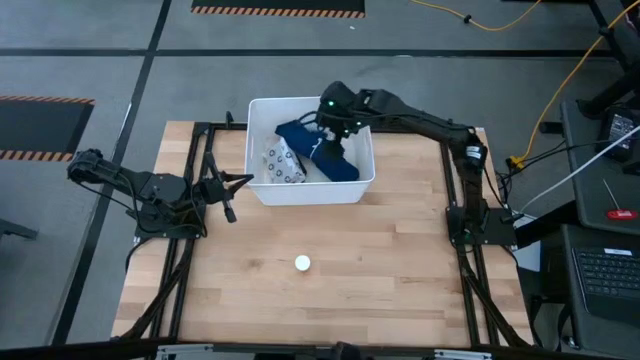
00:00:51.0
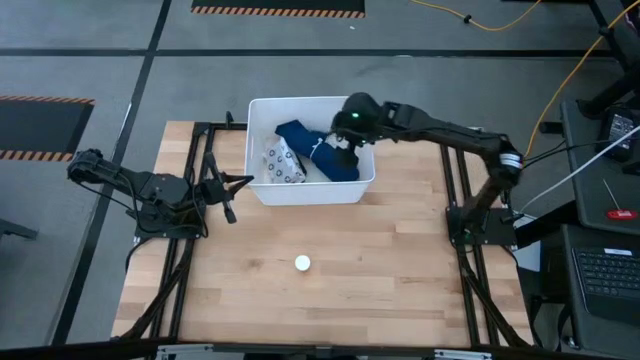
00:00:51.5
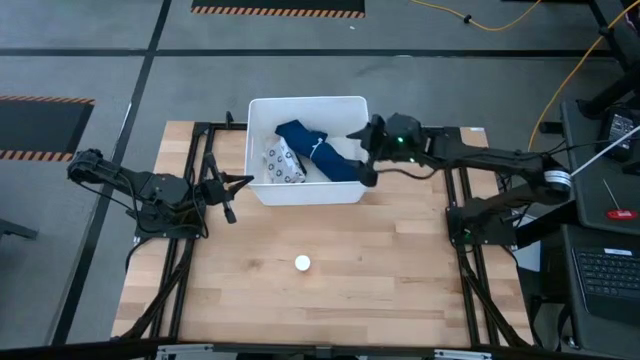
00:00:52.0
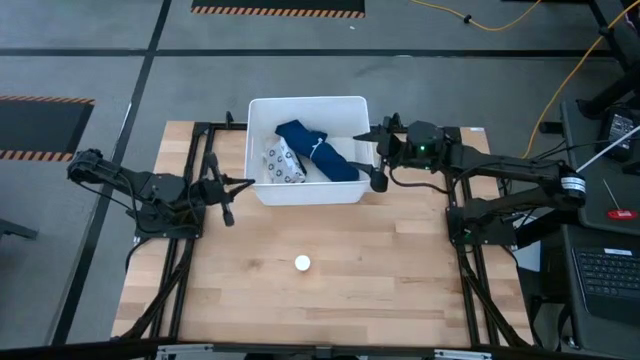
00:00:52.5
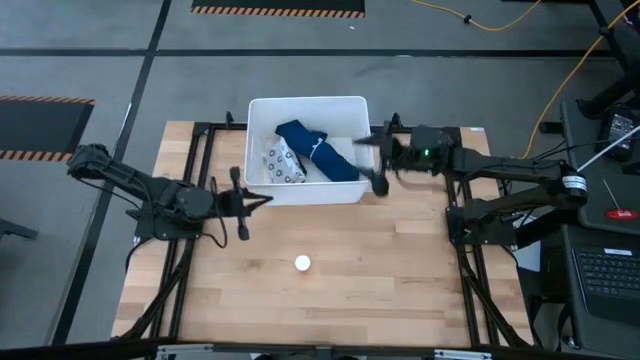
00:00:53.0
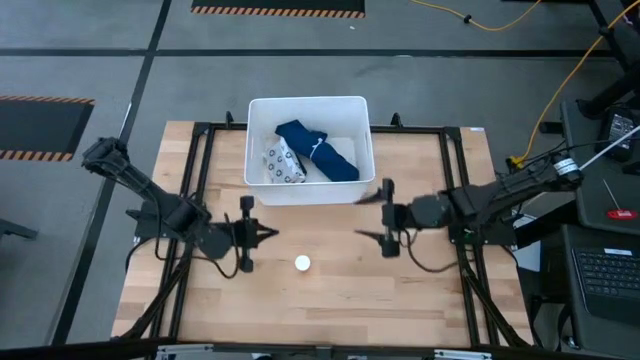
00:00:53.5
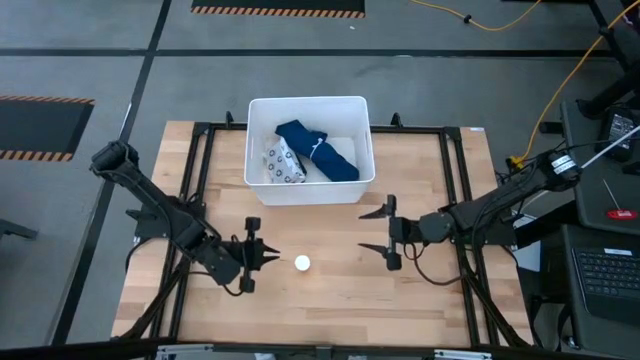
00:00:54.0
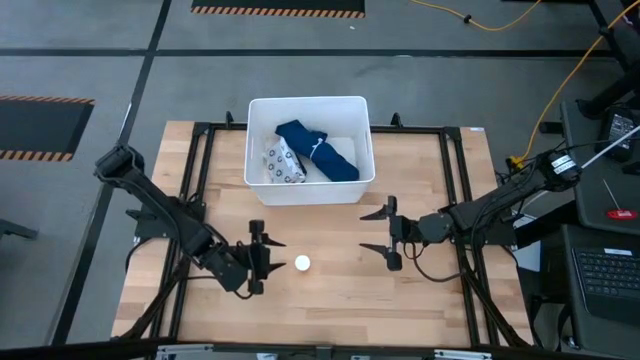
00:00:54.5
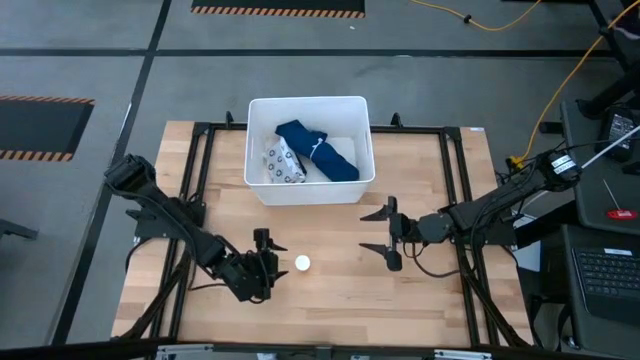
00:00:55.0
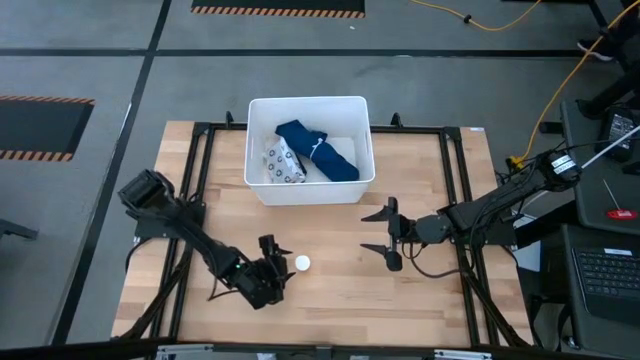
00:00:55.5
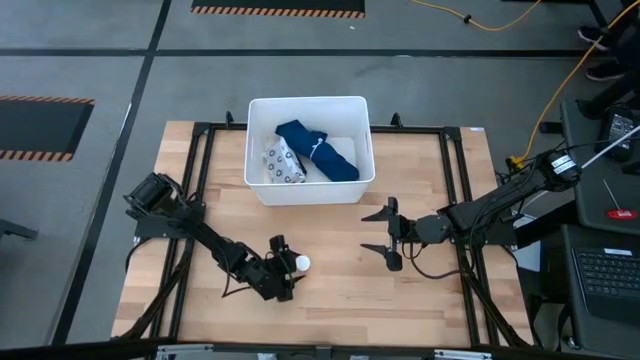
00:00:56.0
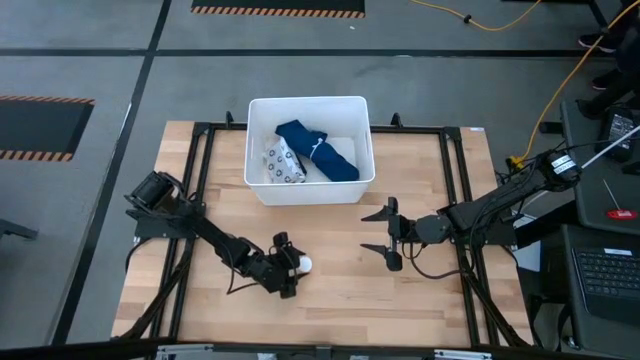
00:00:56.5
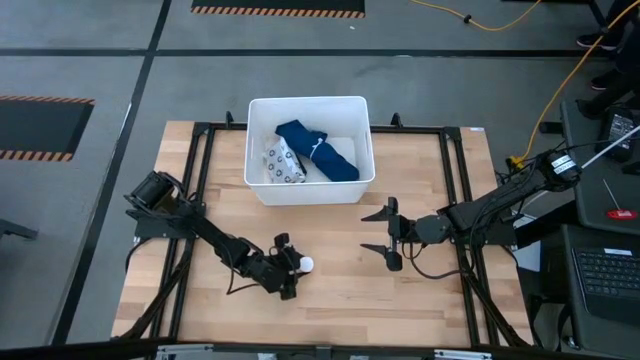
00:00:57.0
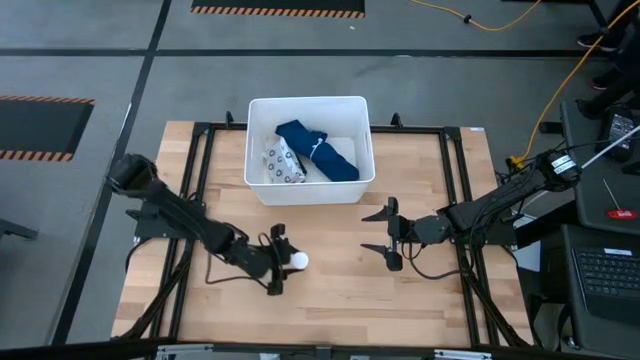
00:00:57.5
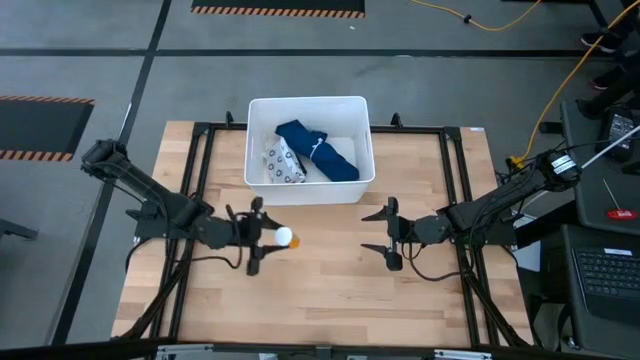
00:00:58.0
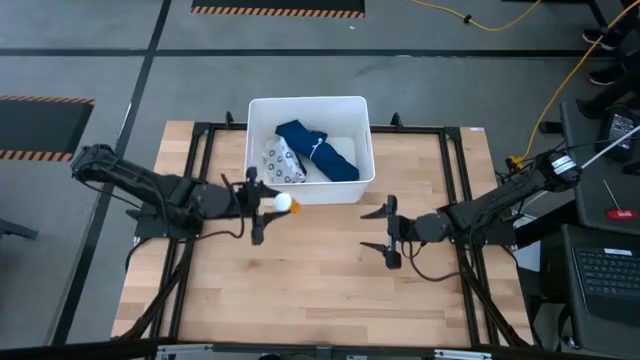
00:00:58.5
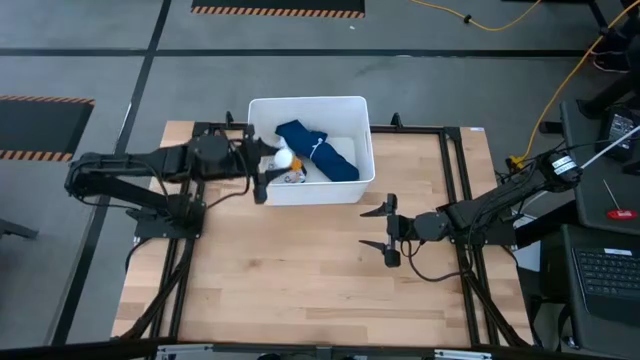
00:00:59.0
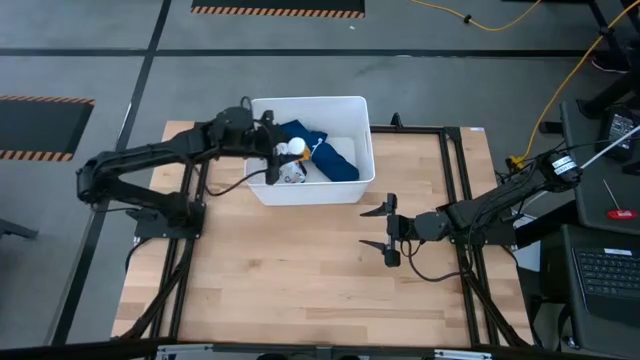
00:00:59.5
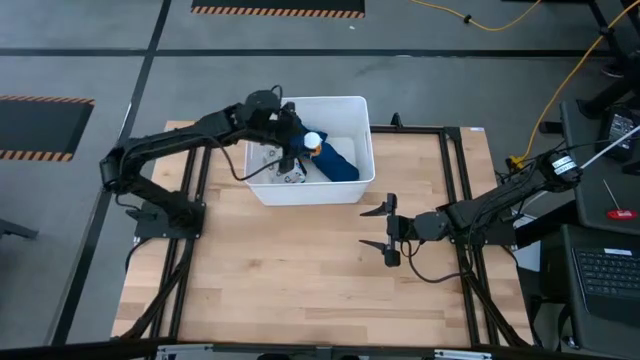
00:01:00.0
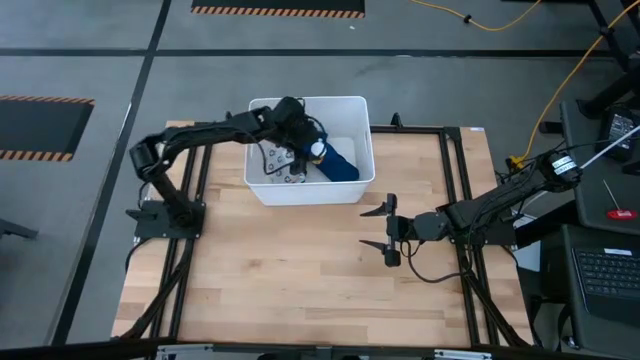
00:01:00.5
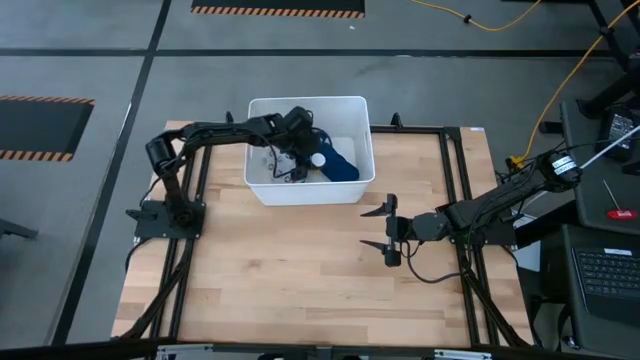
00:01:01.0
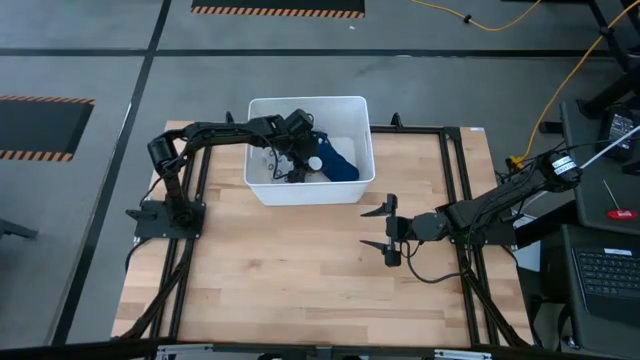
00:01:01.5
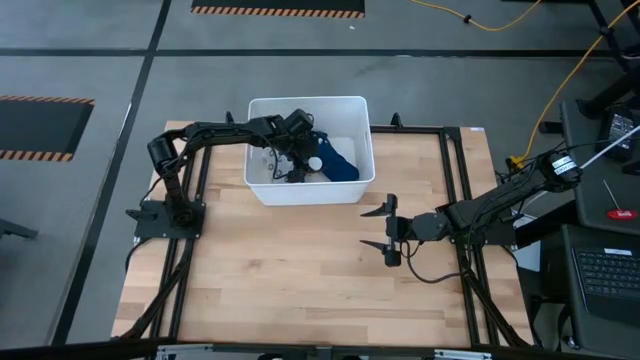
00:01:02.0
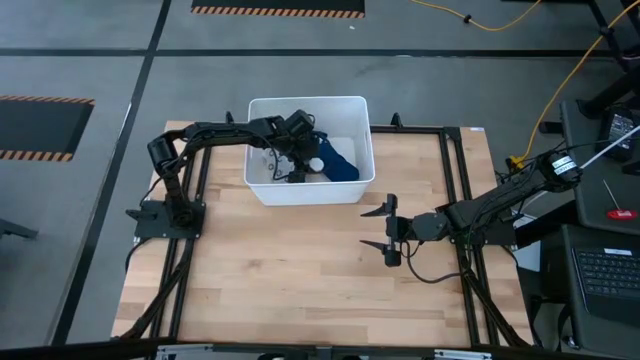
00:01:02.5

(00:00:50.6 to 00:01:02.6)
Task: Pick & place medical supplies in basket/bin
Put the orange medicine bottle into the white bin

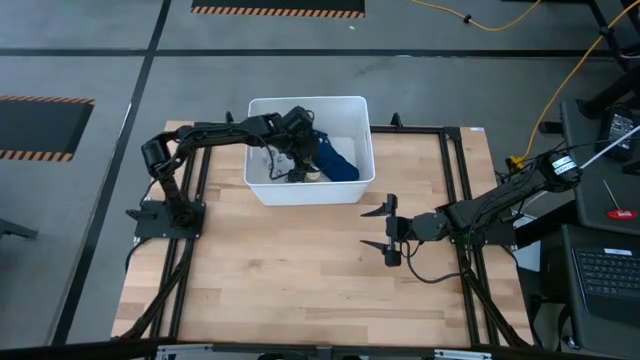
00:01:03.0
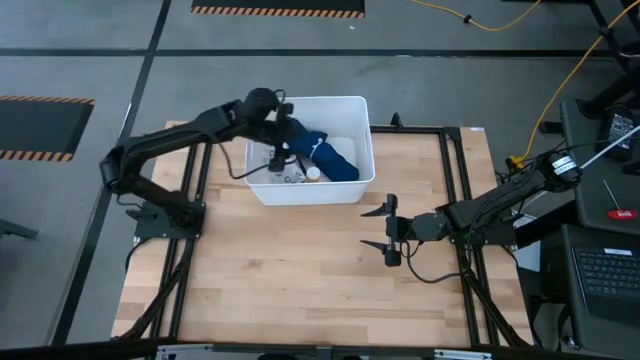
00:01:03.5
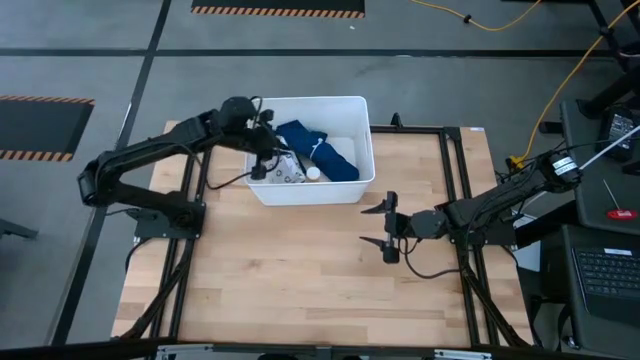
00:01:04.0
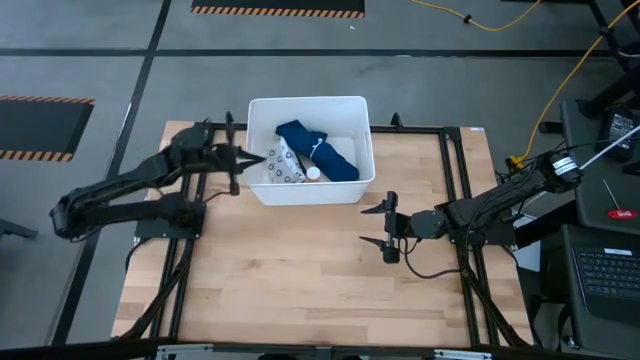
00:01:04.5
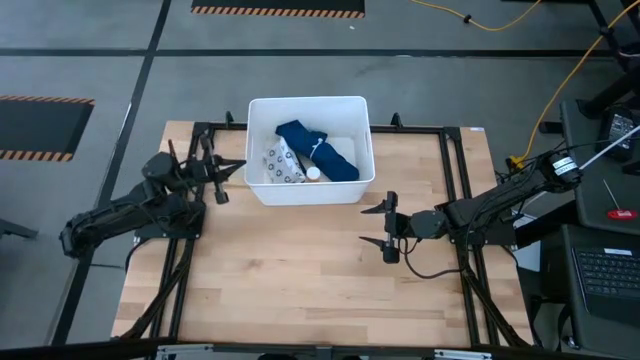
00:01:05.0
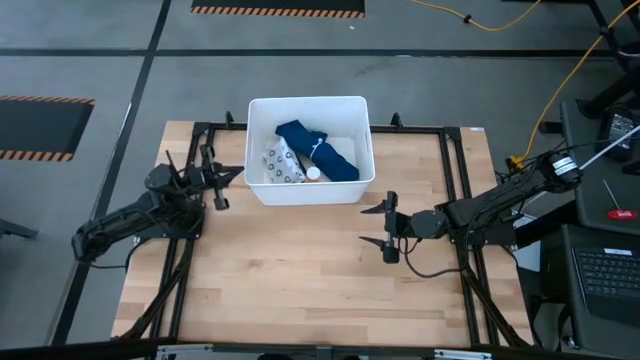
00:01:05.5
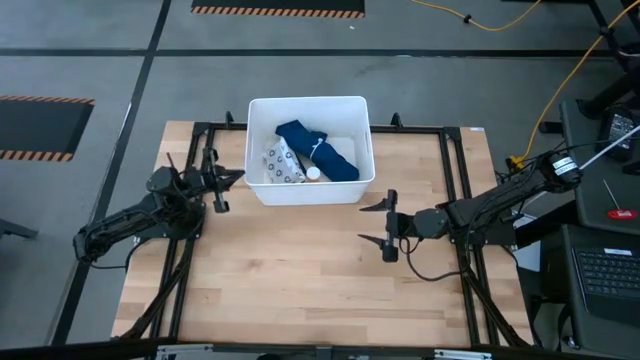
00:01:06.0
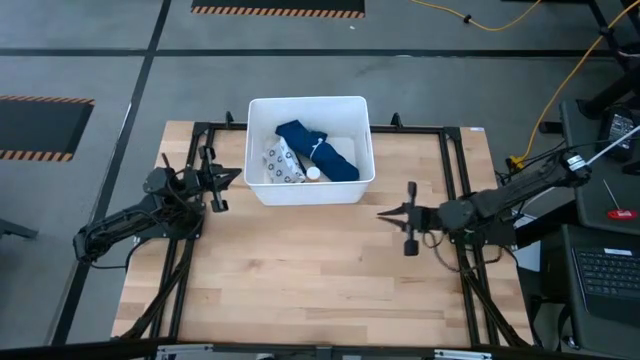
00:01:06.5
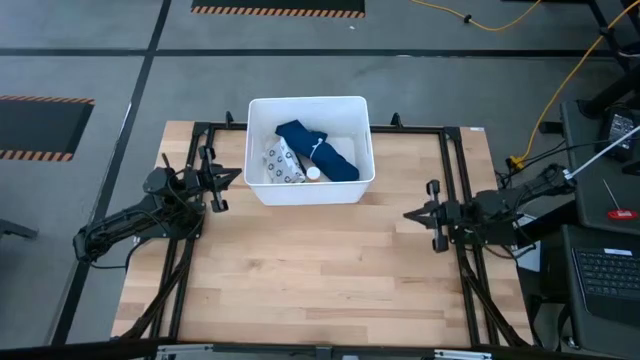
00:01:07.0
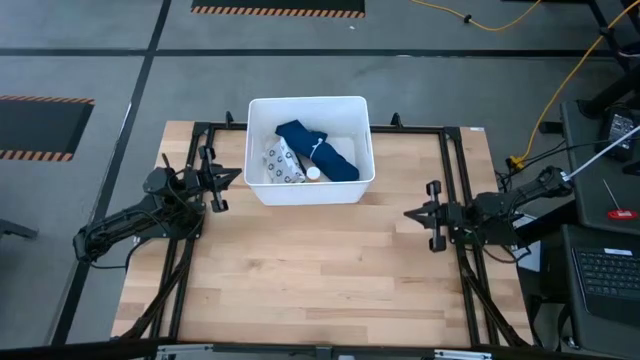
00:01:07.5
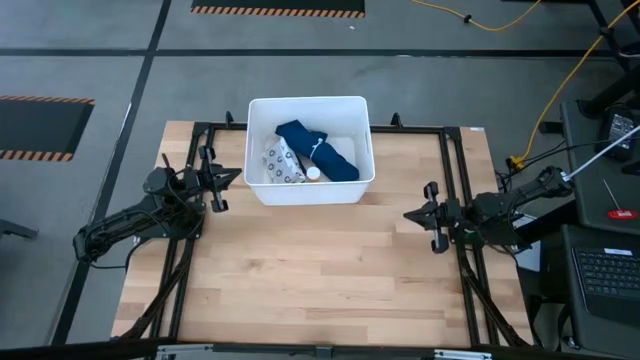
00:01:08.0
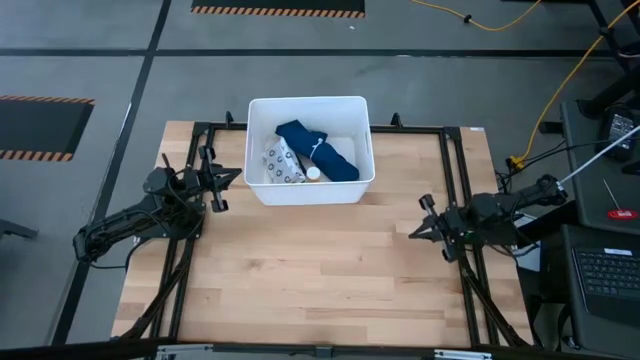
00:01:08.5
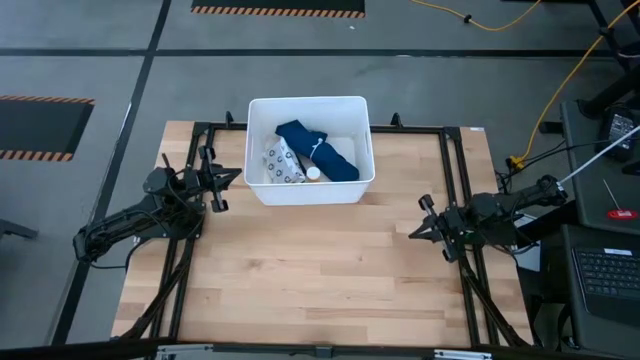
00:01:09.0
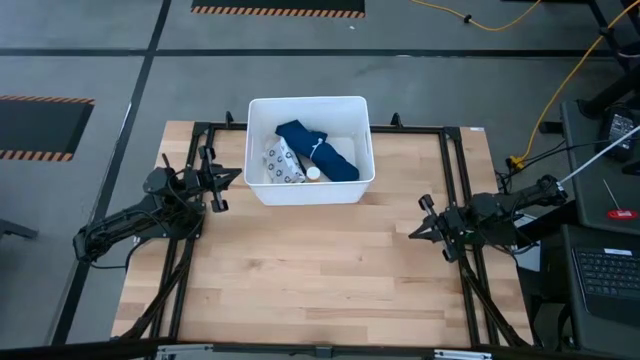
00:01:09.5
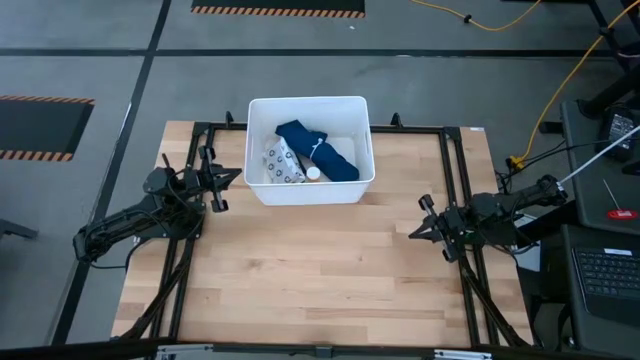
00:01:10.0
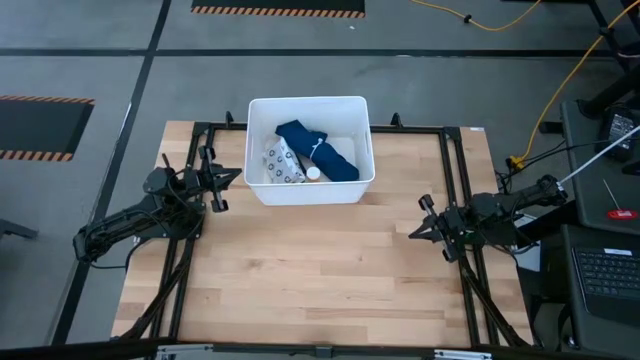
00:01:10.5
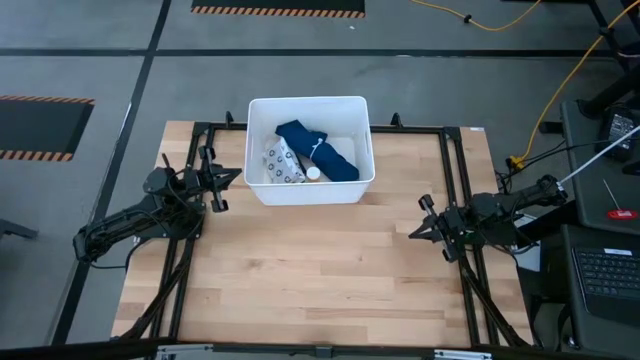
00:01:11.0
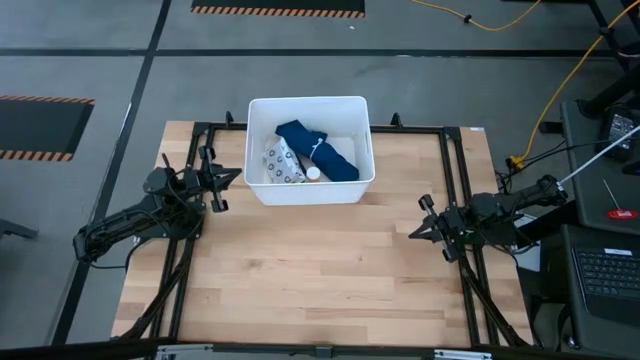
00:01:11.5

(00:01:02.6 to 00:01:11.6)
Return to Home Position
